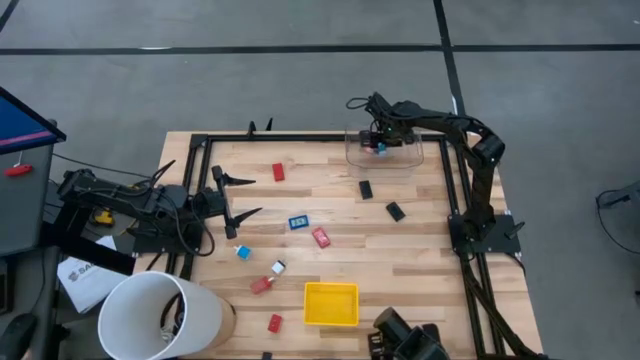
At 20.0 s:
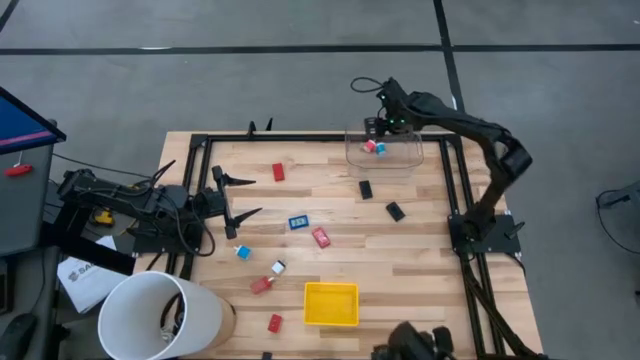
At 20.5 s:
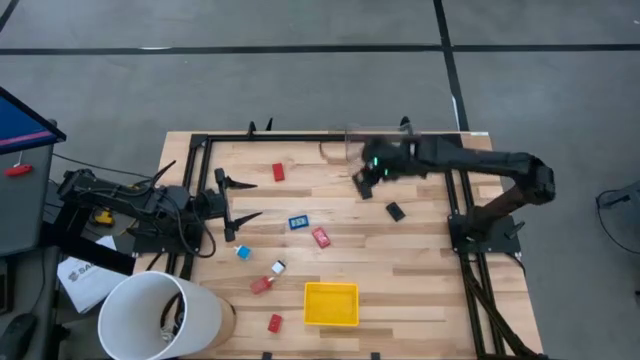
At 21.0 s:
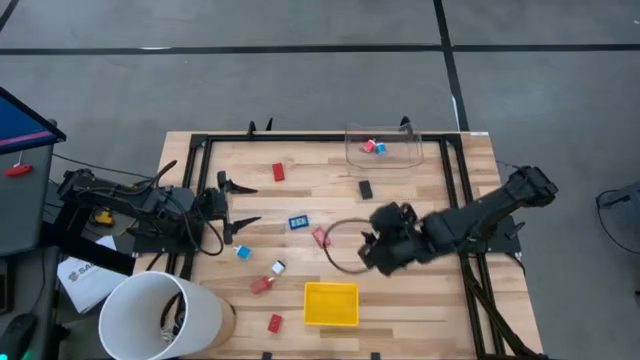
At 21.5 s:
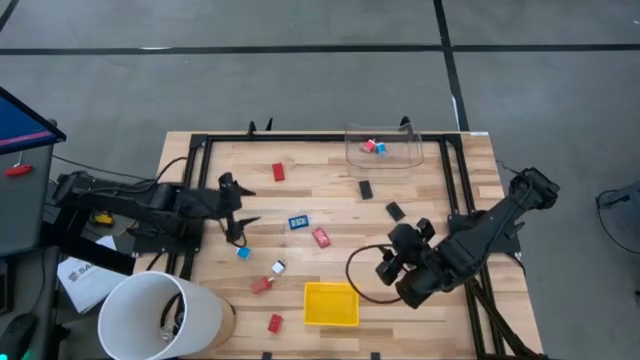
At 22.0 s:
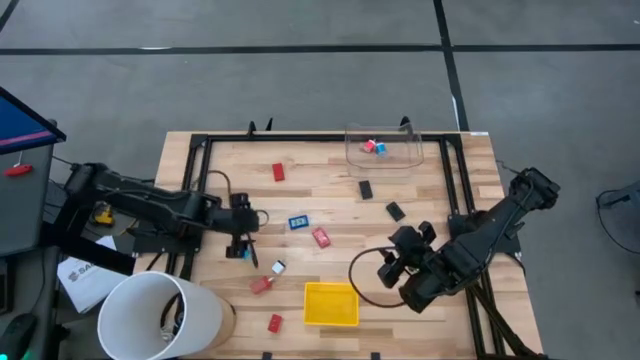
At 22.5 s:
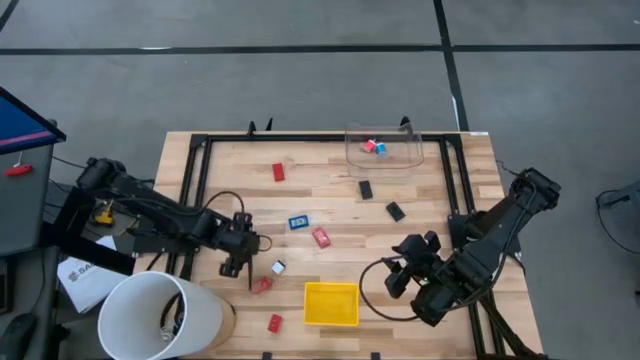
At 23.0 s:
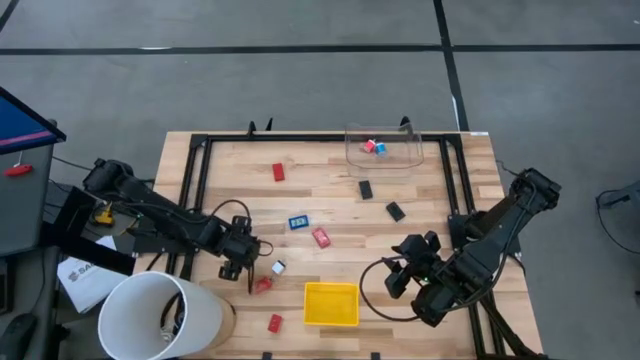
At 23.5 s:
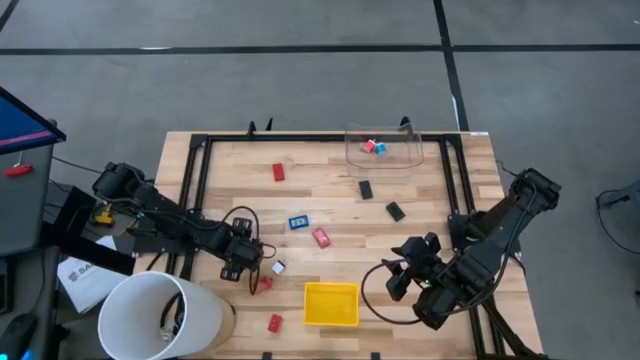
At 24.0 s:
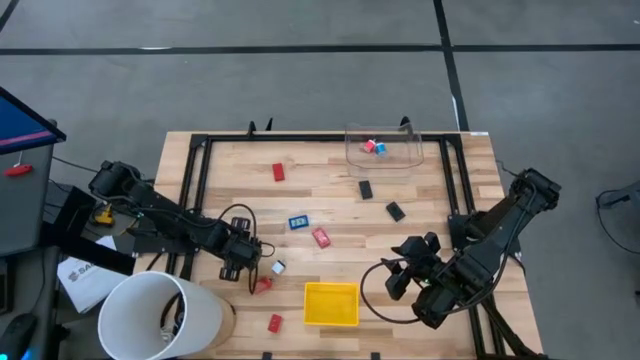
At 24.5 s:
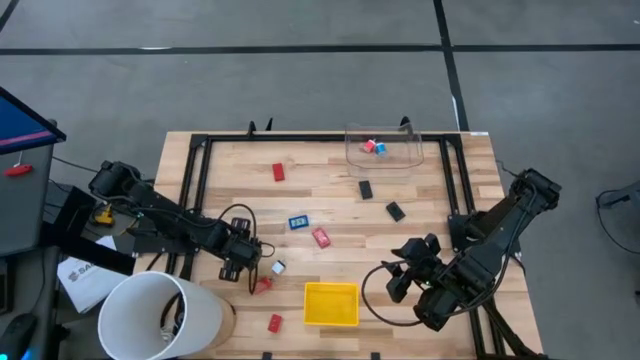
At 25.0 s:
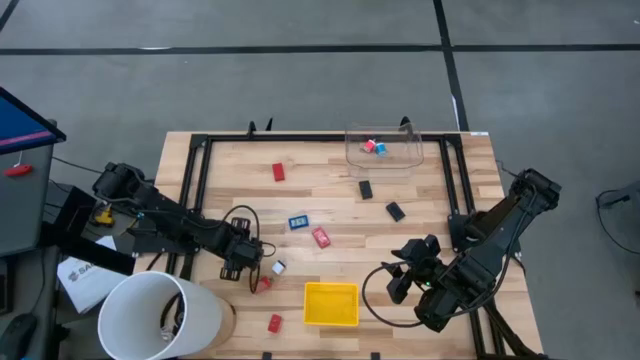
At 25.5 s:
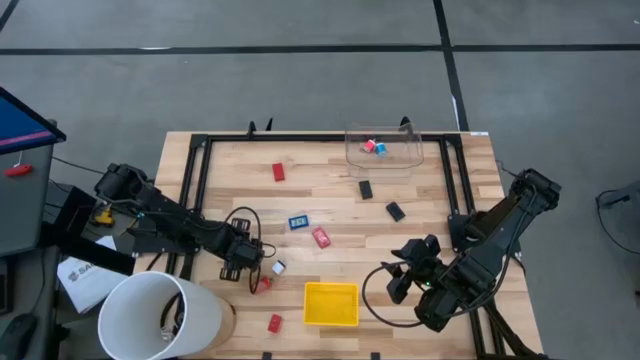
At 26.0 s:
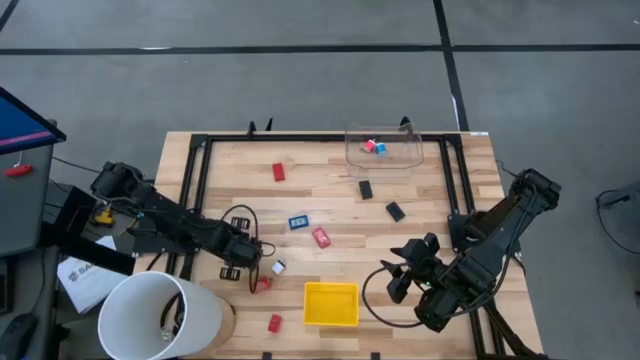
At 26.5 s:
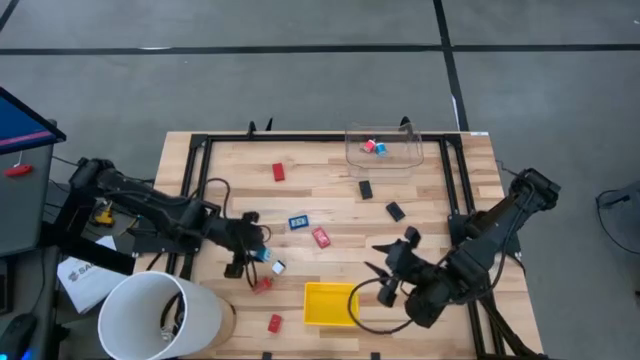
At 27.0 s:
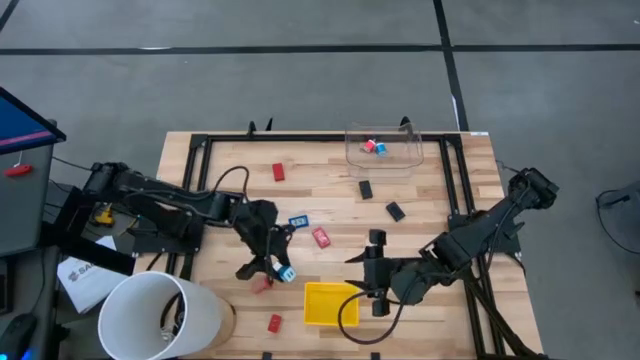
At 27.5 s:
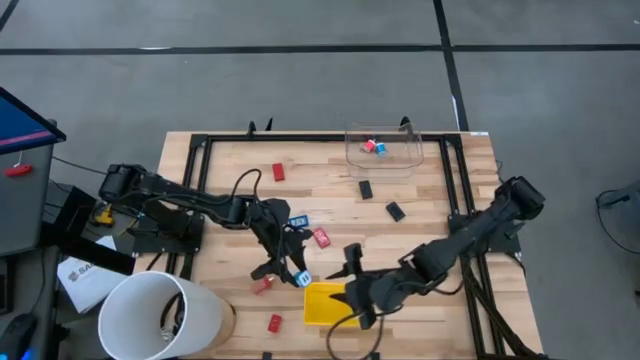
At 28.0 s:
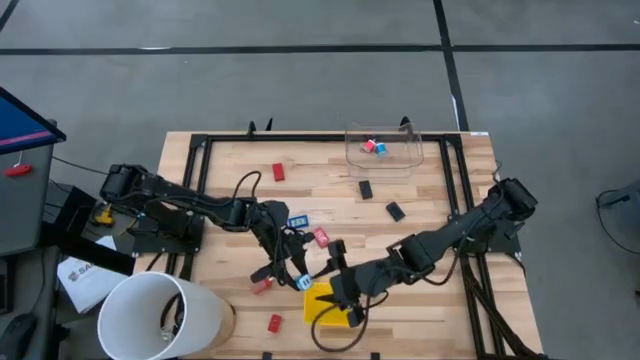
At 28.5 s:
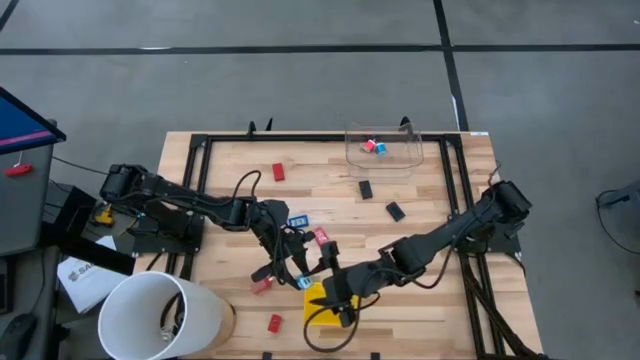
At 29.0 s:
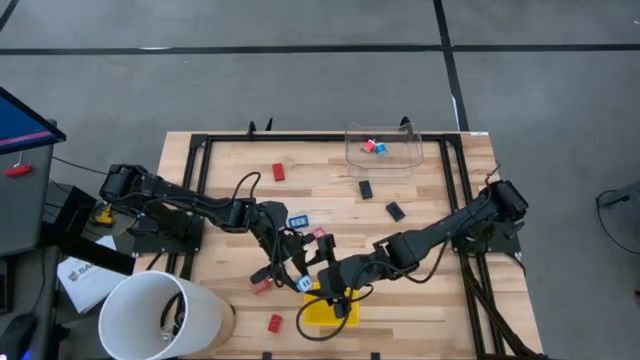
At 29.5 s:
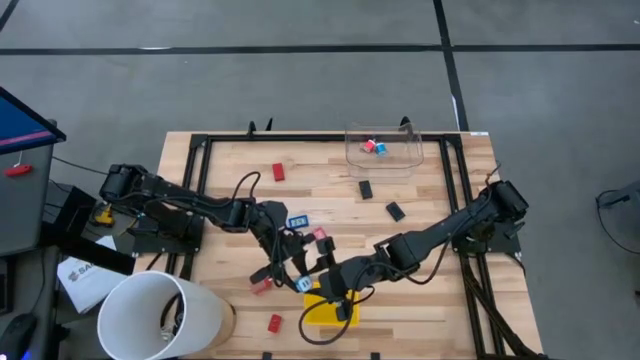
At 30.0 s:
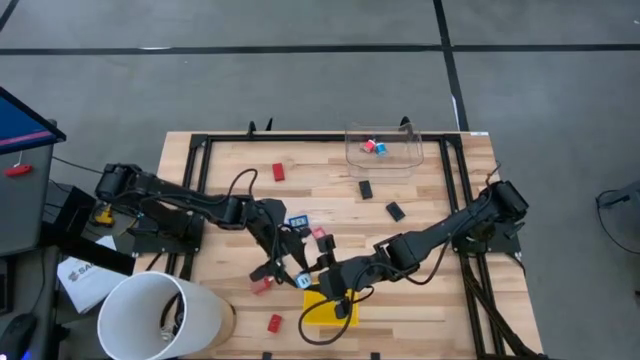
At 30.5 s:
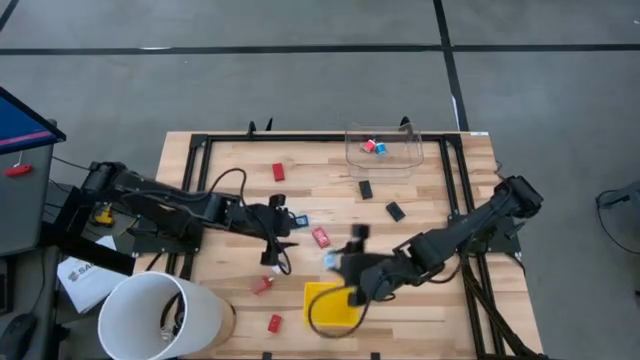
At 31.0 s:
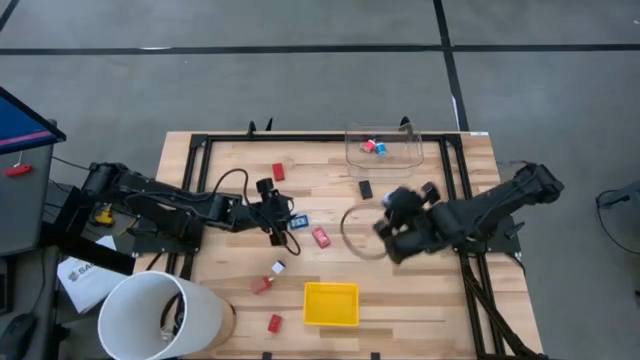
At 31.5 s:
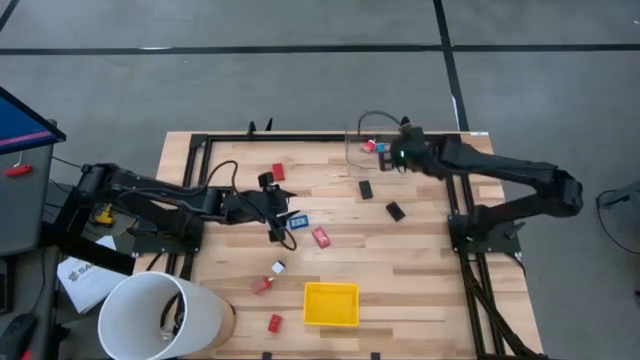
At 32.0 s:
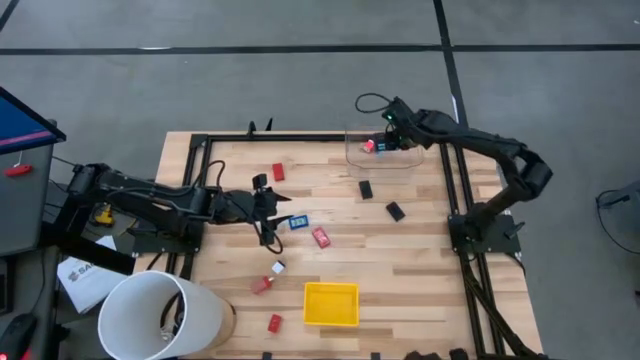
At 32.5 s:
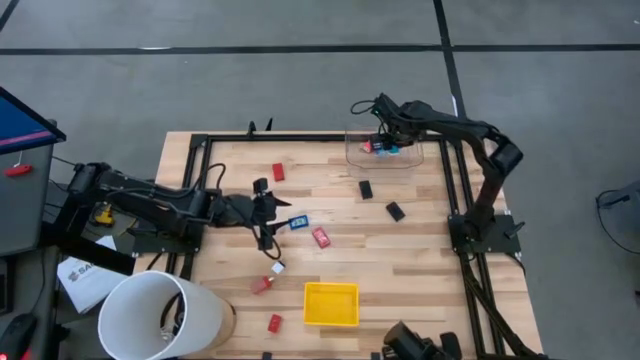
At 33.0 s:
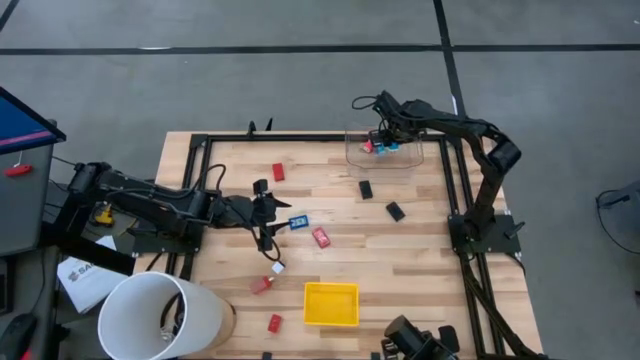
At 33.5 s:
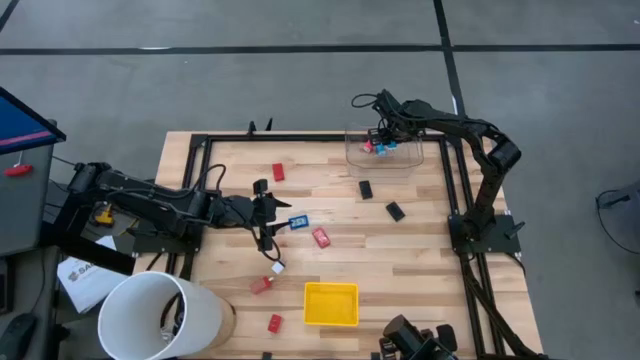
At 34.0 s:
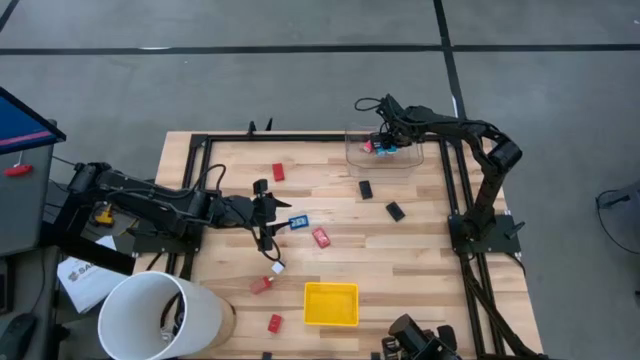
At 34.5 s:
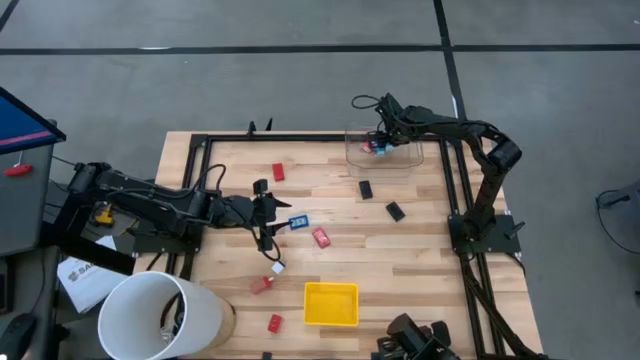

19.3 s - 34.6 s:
Task: Pick & Place Office items
Put the blue charger adapter into the transparent bin

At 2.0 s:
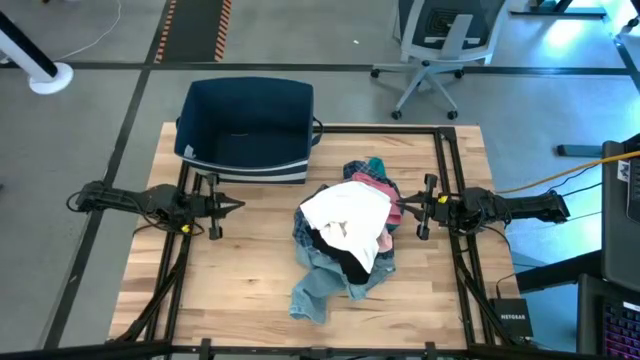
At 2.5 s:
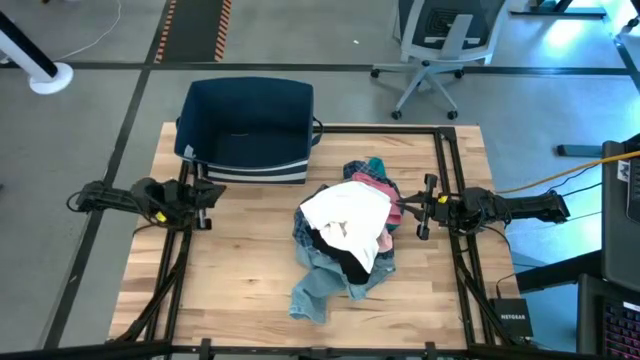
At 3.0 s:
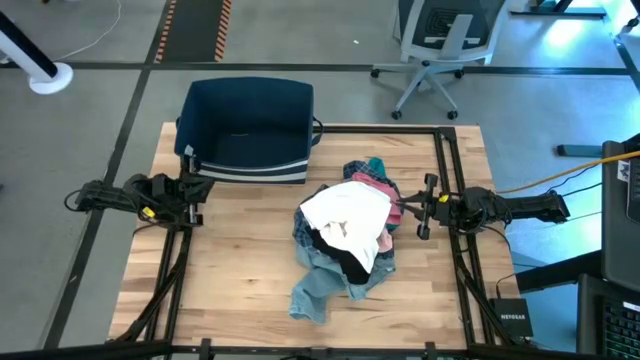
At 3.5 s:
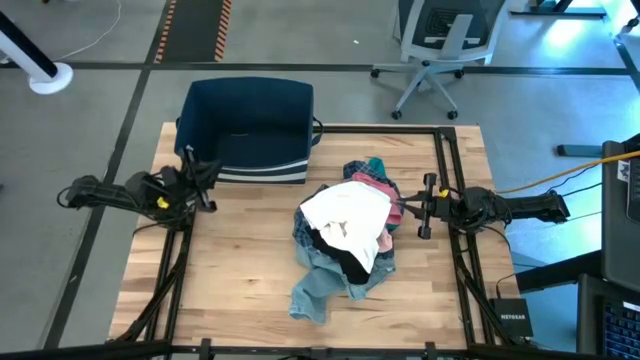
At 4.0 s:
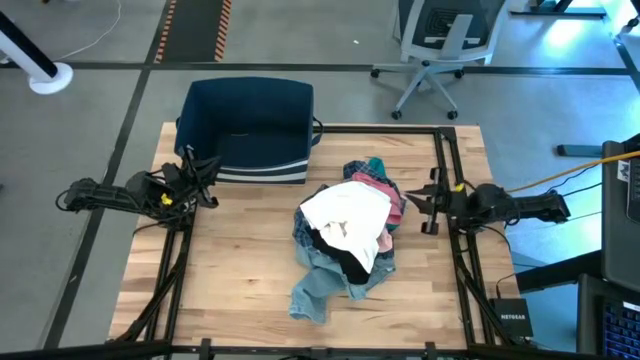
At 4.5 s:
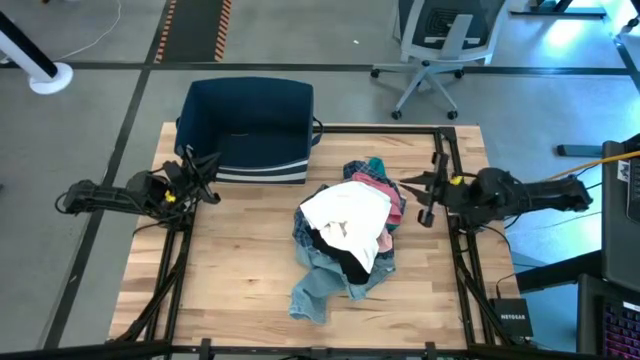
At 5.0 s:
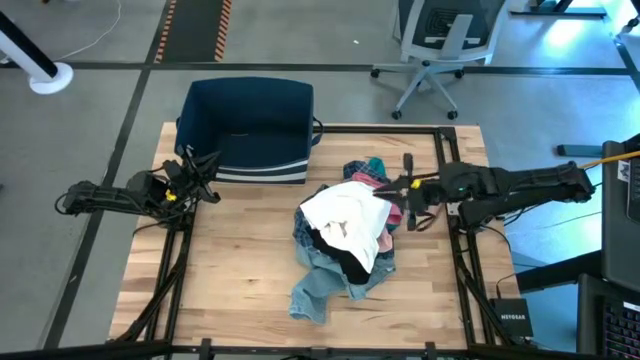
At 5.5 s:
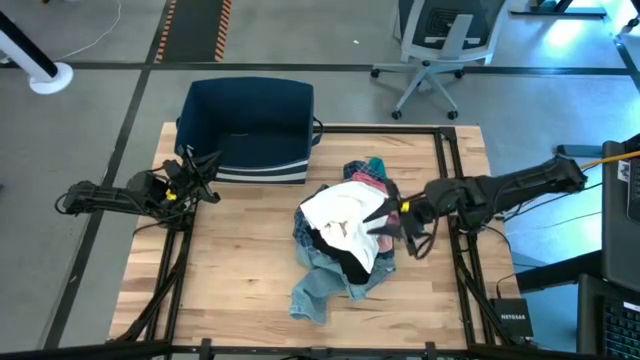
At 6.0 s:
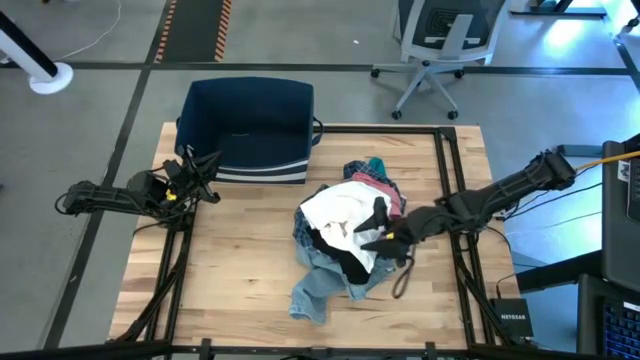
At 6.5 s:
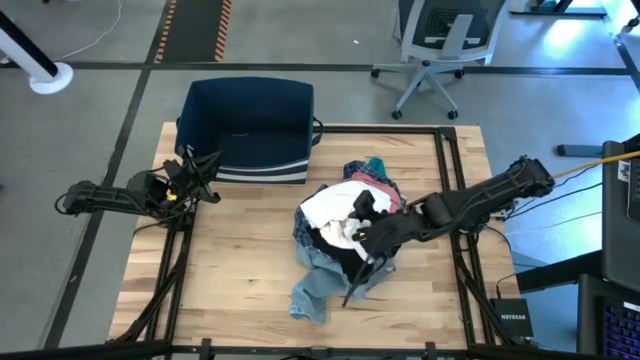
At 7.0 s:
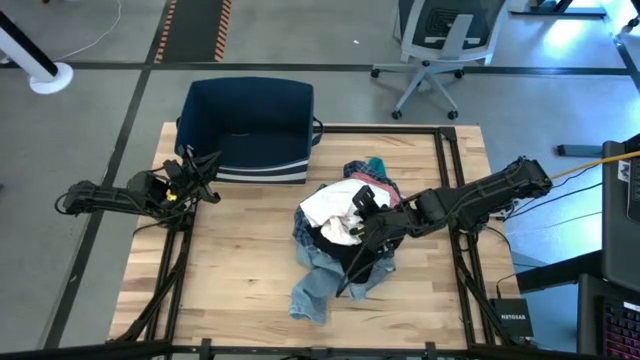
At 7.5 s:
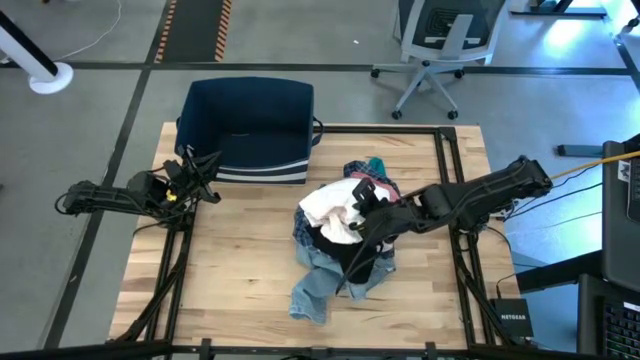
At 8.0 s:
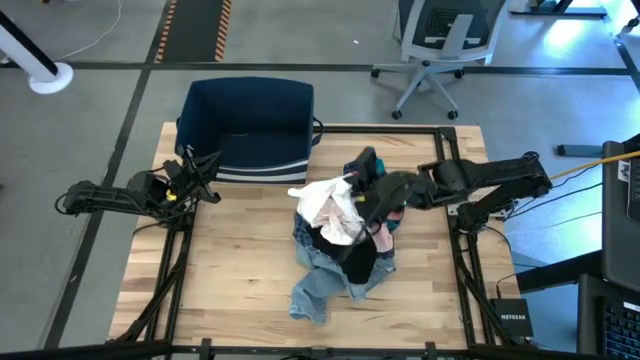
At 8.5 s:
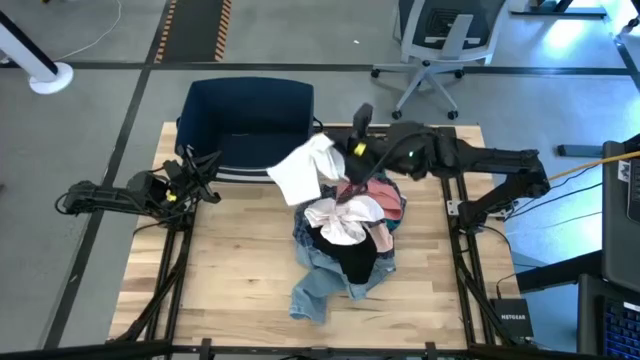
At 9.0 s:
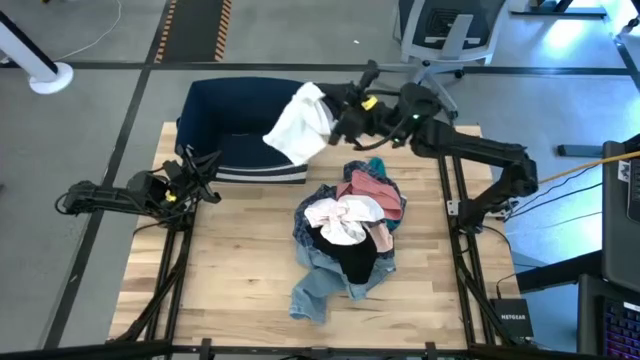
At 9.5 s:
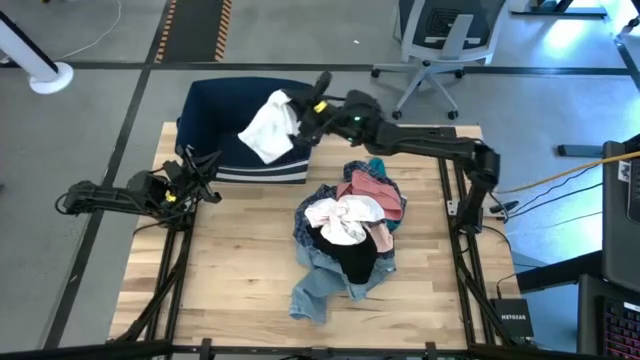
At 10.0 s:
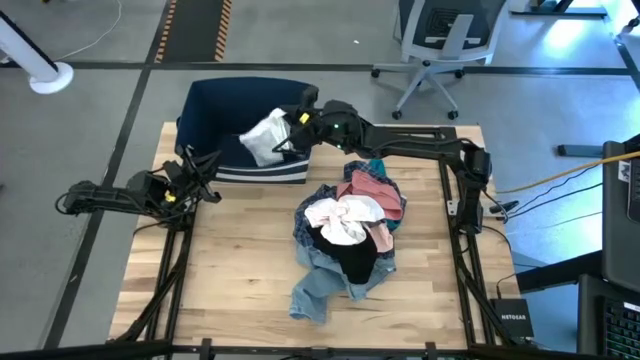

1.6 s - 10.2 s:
Task: Sort clothes
Put the white underwear into the blue laundry bin
